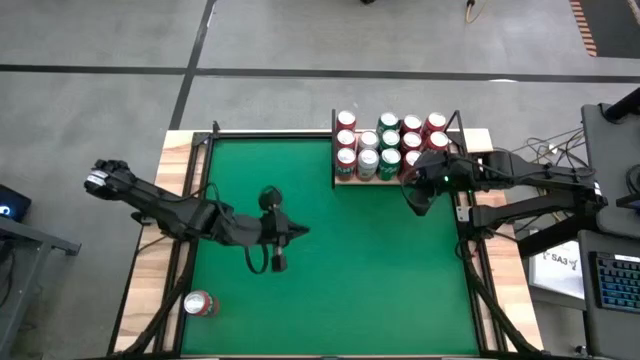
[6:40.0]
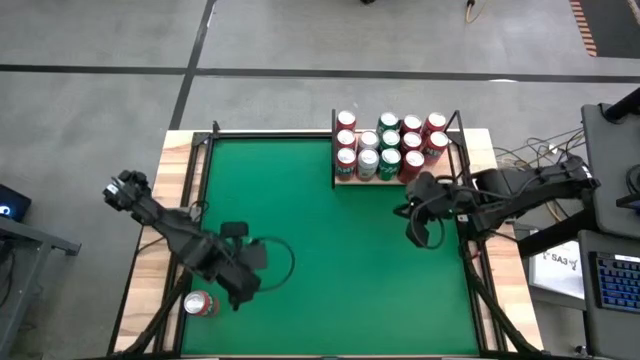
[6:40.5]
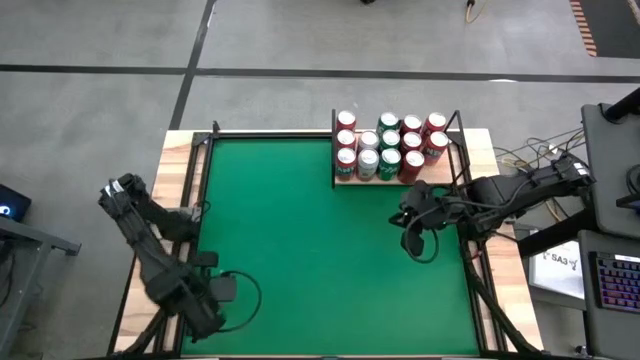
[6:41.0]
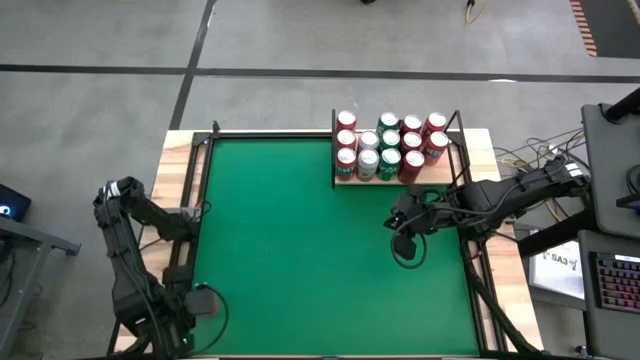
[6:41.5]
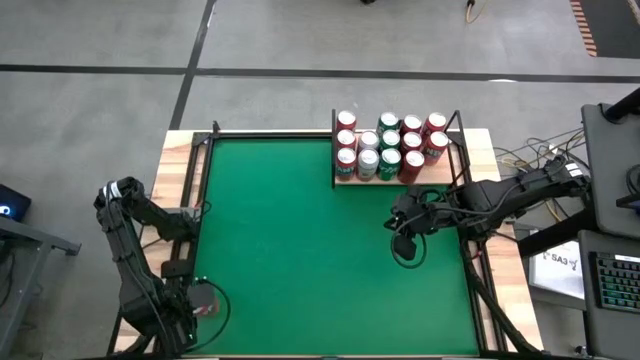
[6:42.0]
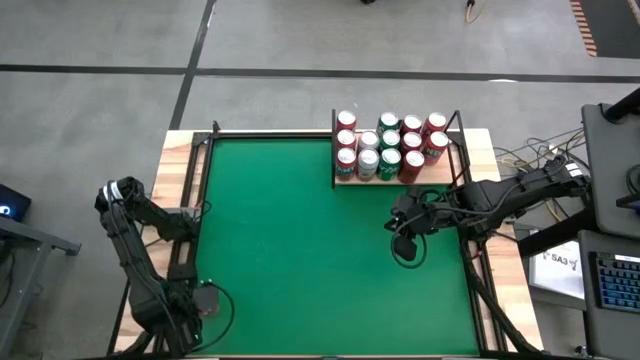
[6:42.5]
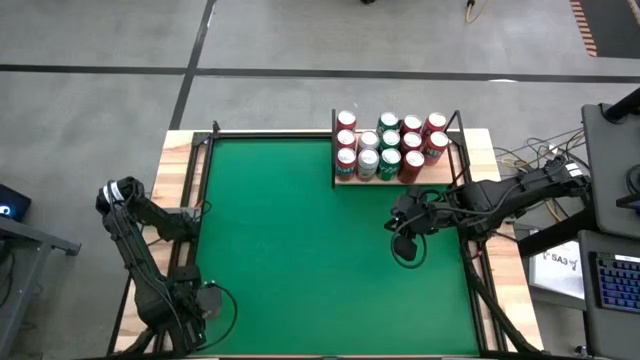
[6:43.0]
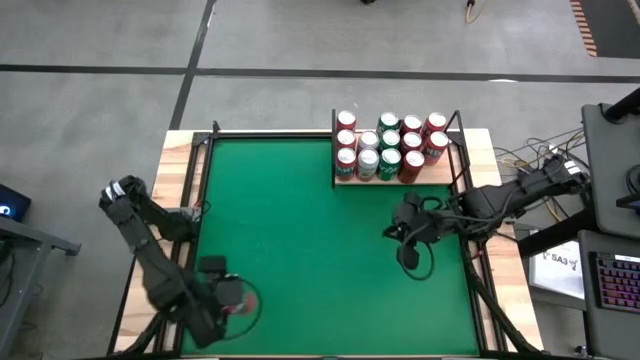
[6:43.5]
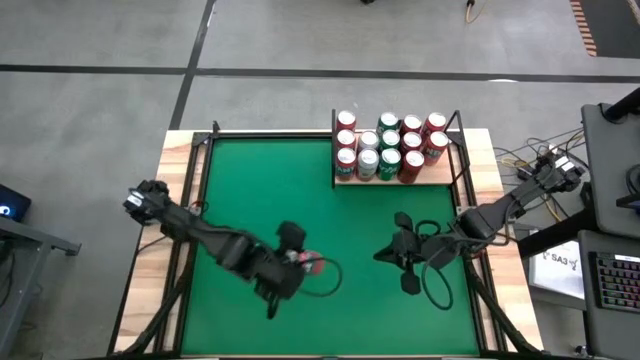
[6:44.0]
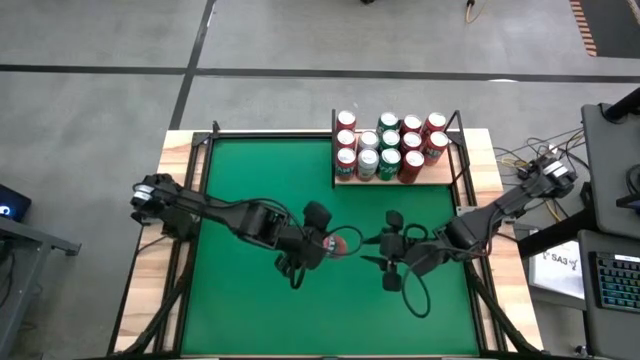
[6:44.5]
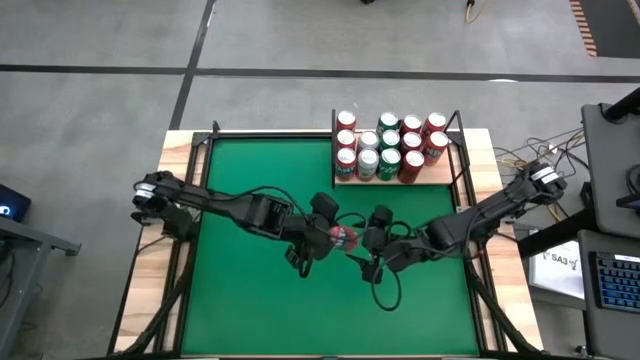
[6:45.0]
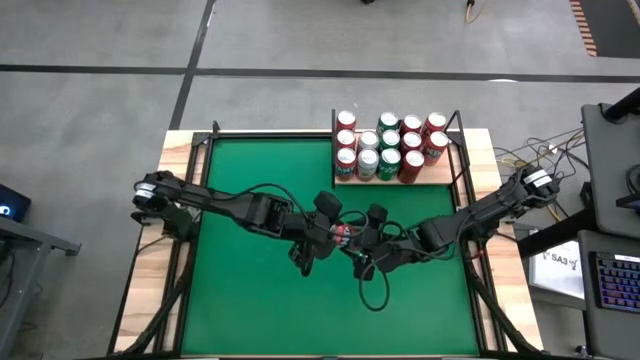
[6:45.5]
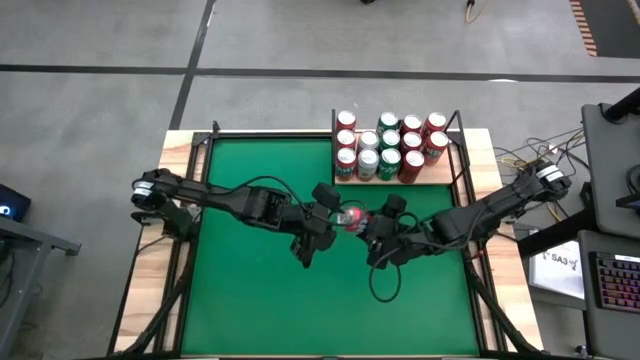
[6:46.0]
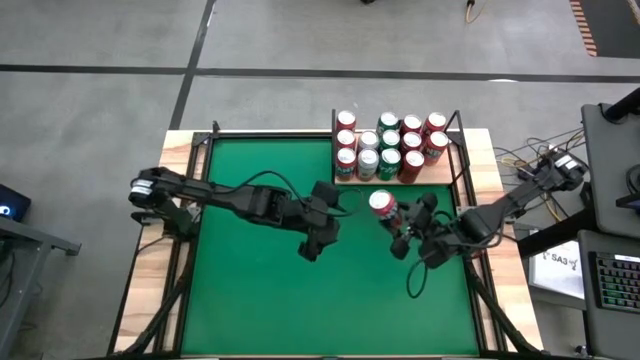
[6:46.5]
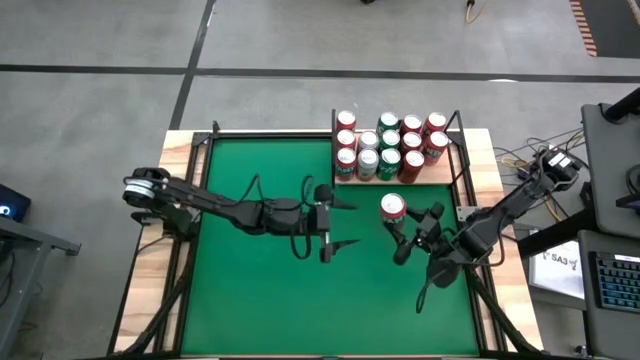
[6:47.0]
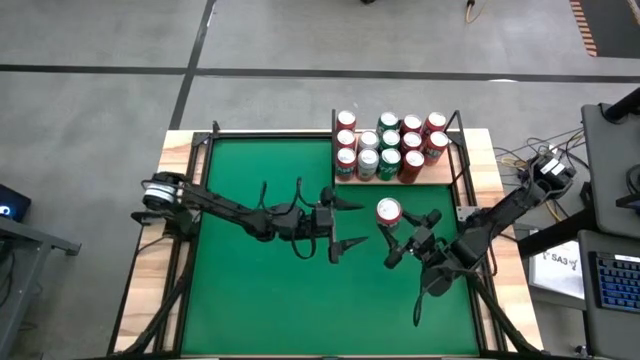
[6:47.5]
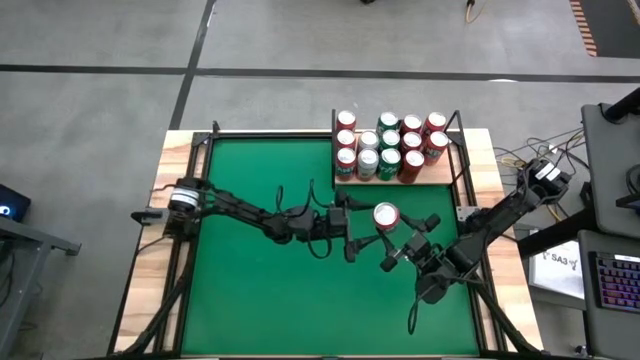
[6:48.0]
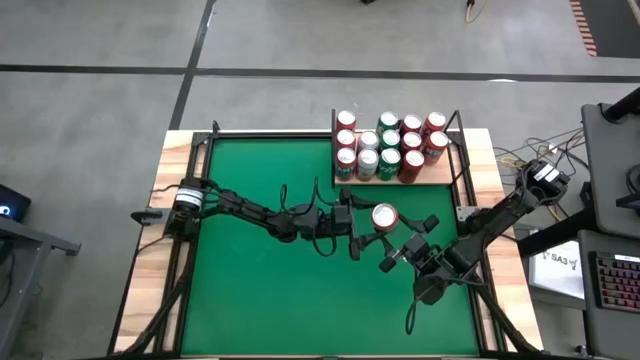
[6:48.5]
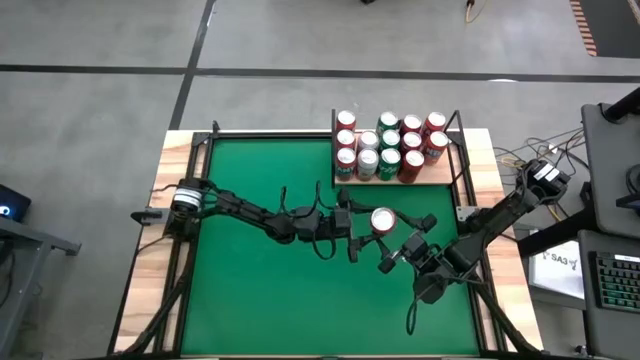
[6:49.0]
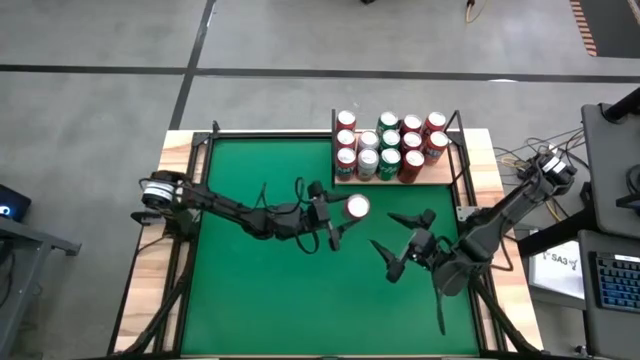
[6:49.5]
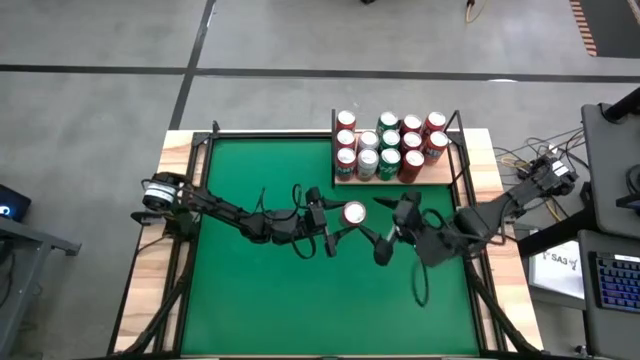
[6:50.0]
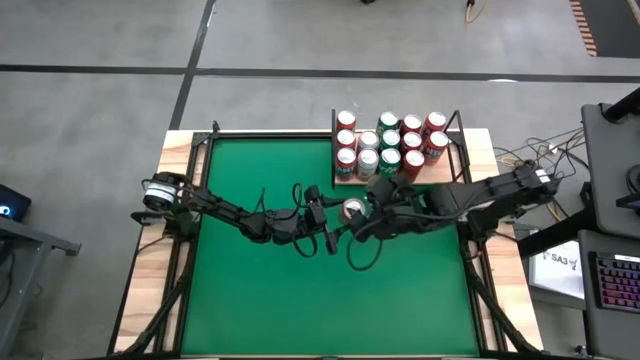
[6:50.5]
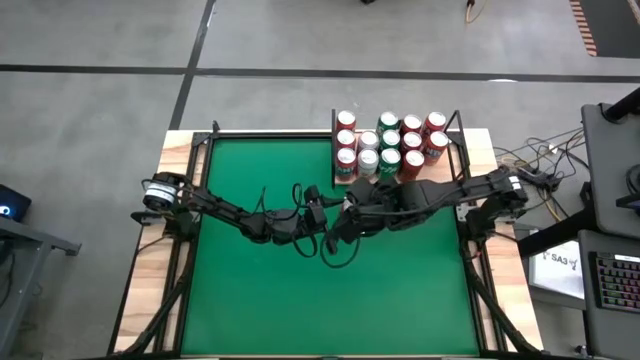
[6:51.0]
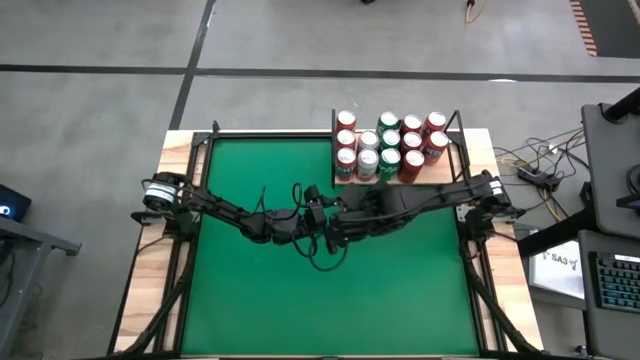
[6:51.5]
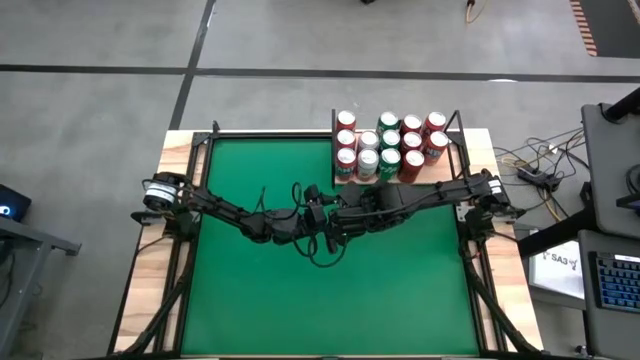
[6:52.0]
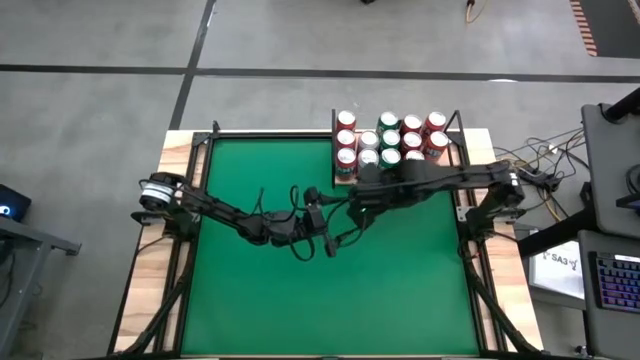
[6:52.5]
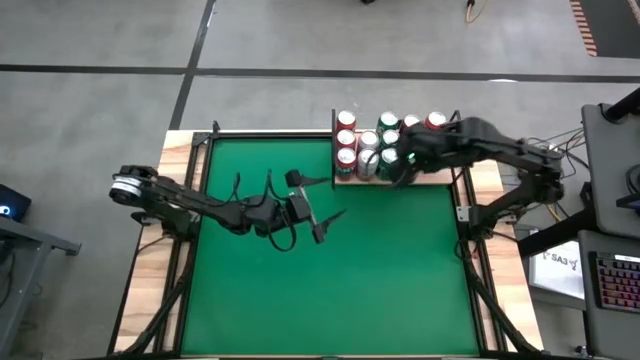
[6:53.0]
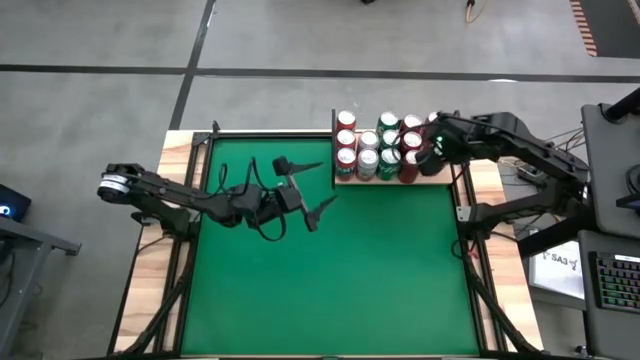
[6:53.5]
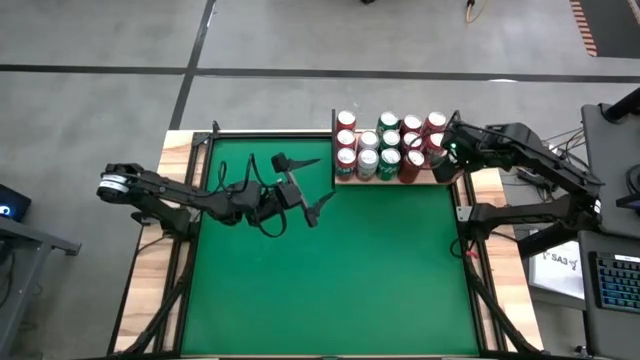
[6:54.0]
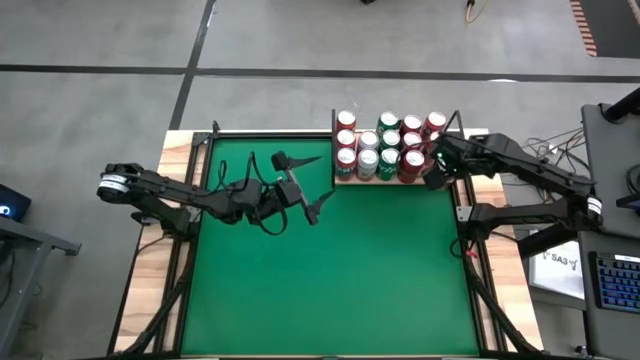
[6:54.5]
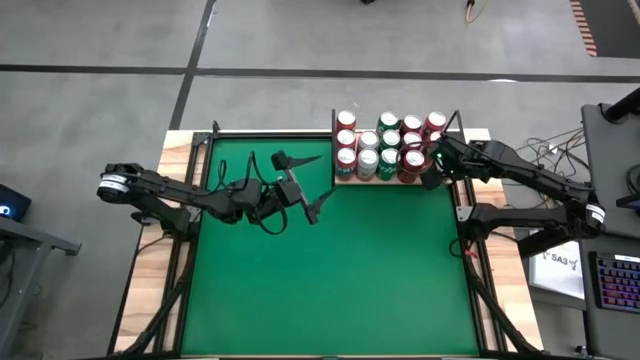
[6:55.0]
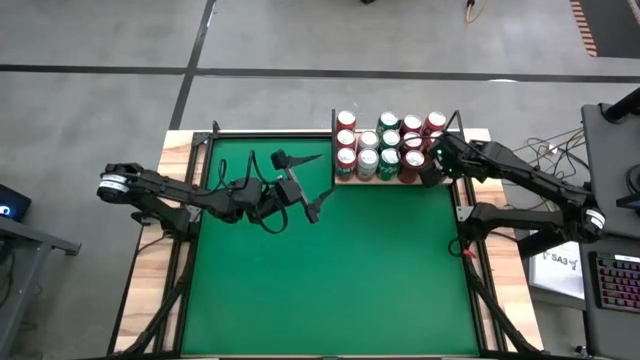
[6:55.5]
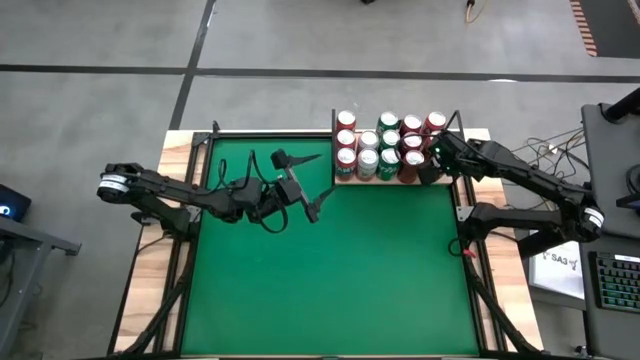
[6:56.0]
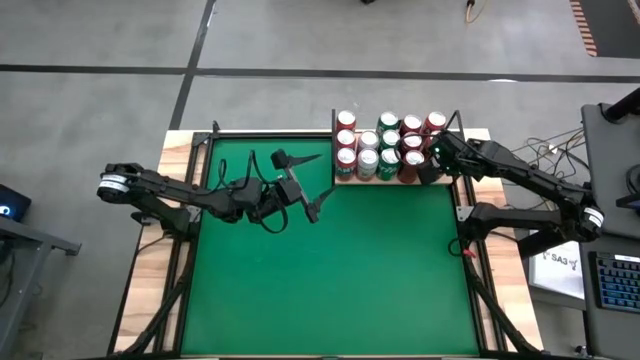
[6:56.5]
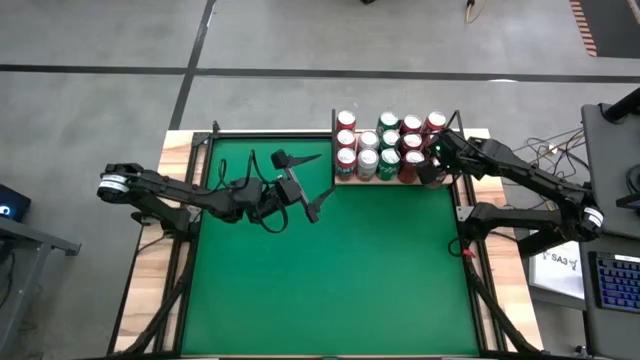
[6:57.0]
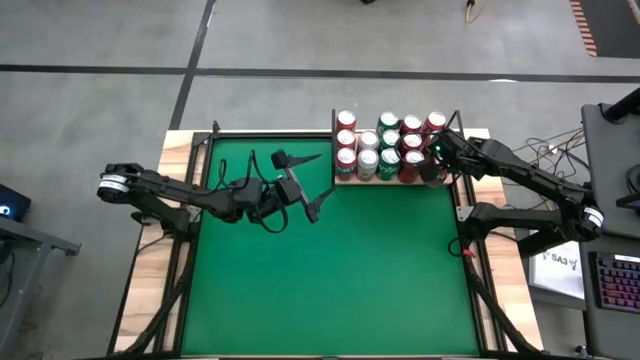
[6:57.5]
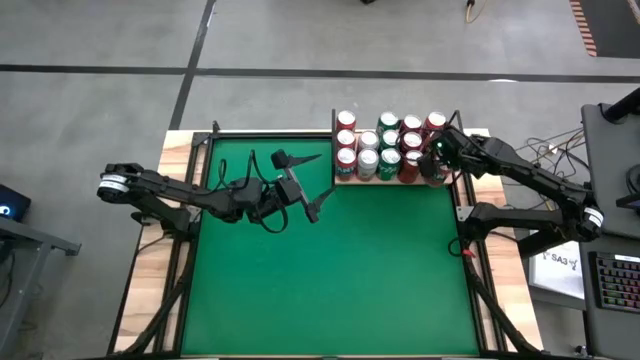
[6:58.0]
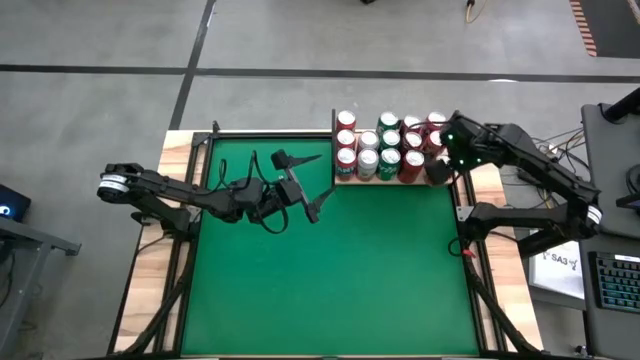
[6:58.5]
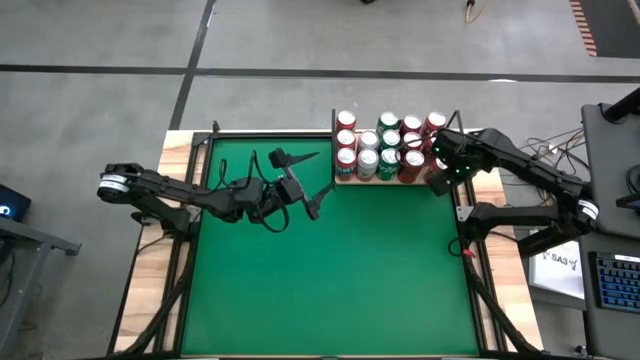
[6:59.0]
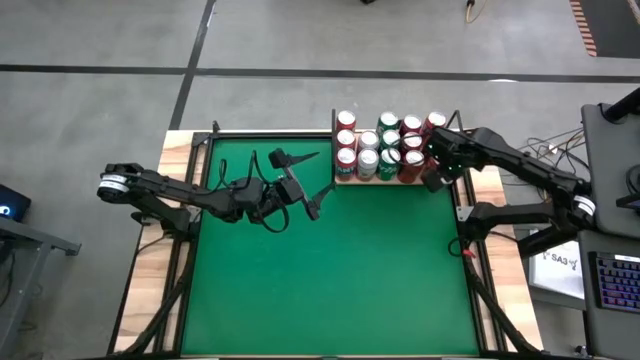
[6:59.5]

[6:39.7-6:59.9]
Task: Place canned beverage on shelf
Put the red soda can on the shelf aligned with the other red soda cans
